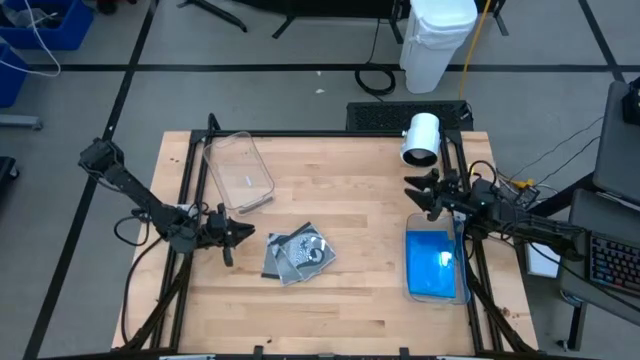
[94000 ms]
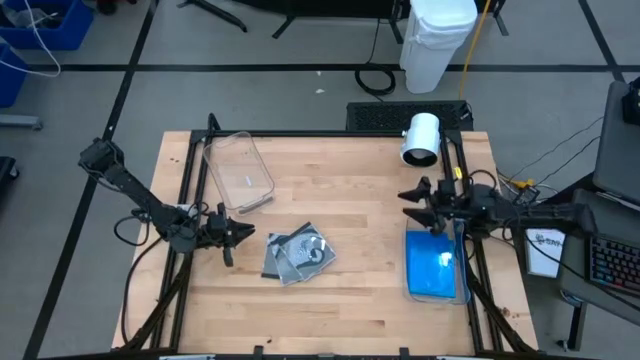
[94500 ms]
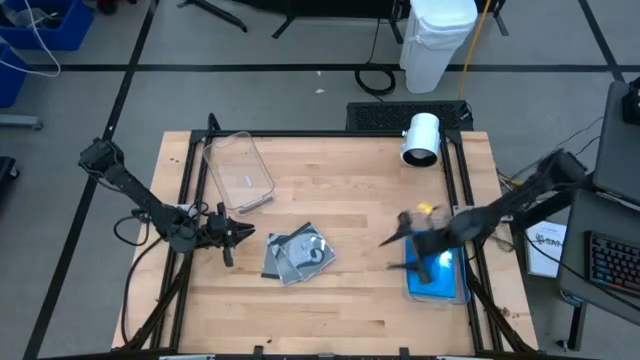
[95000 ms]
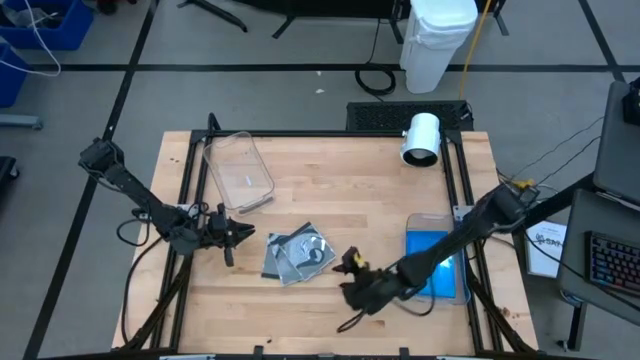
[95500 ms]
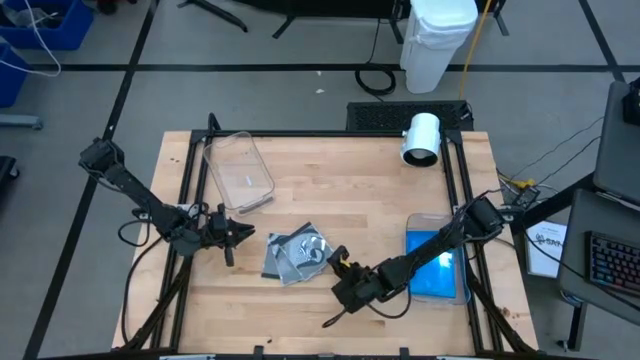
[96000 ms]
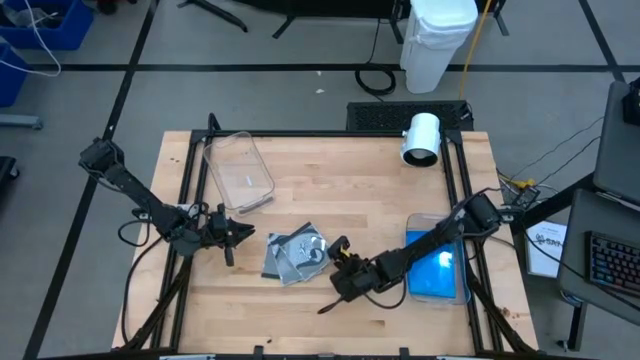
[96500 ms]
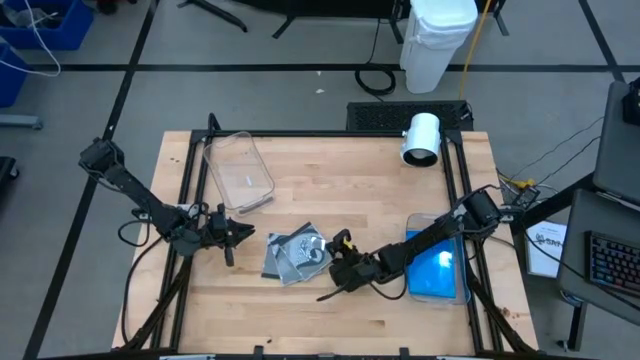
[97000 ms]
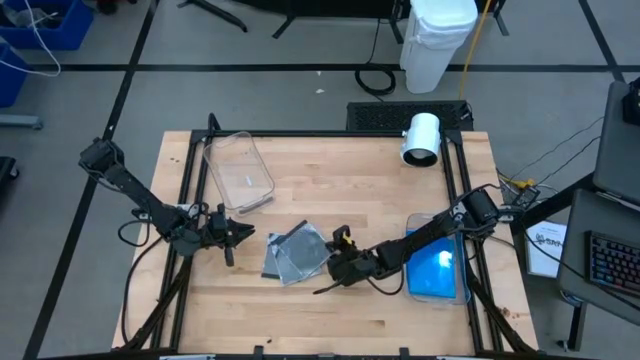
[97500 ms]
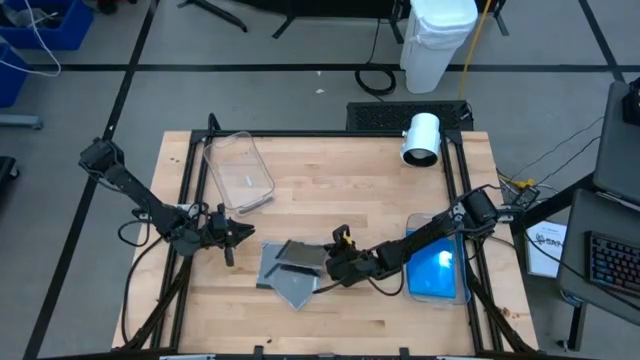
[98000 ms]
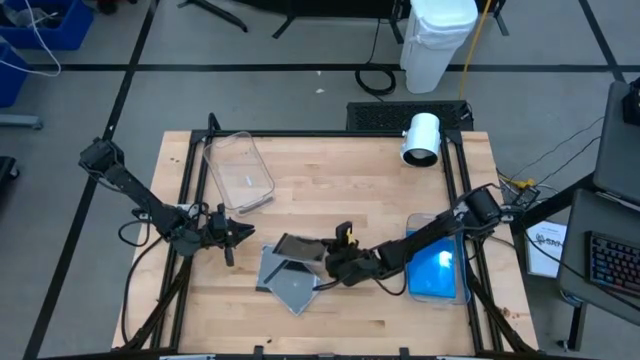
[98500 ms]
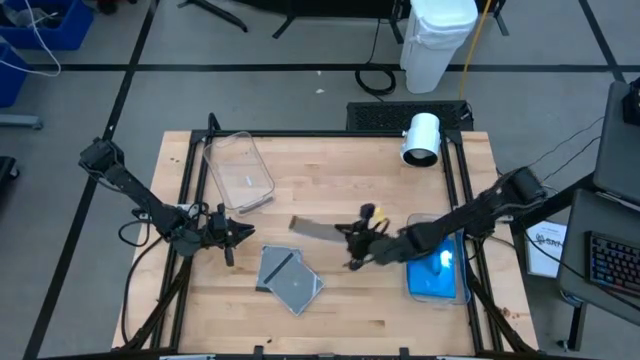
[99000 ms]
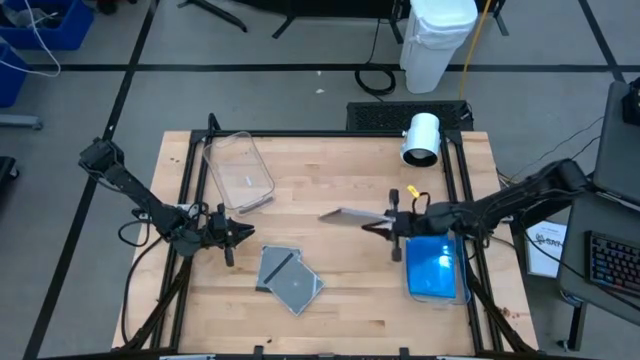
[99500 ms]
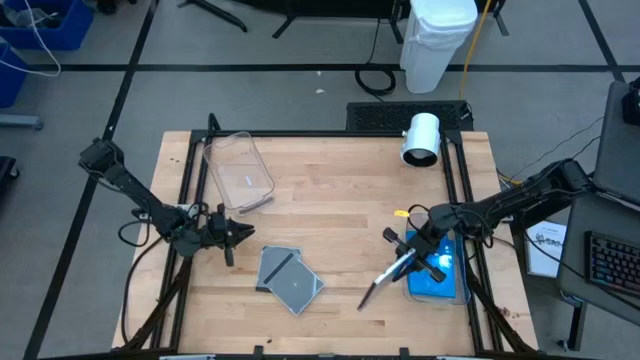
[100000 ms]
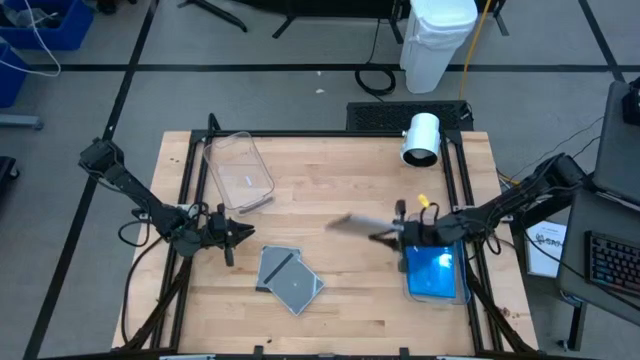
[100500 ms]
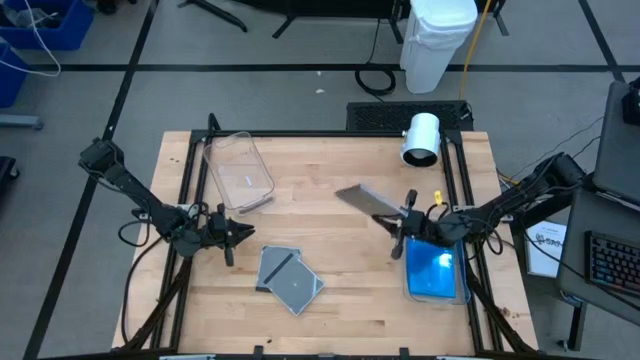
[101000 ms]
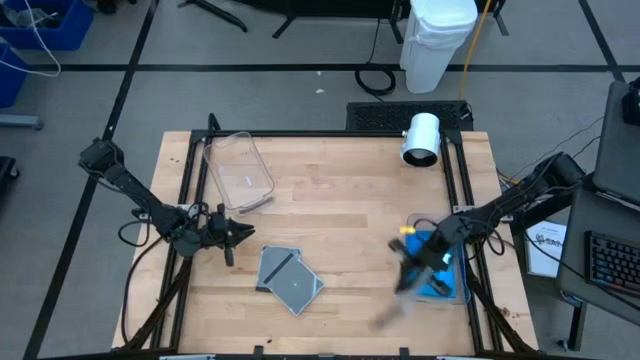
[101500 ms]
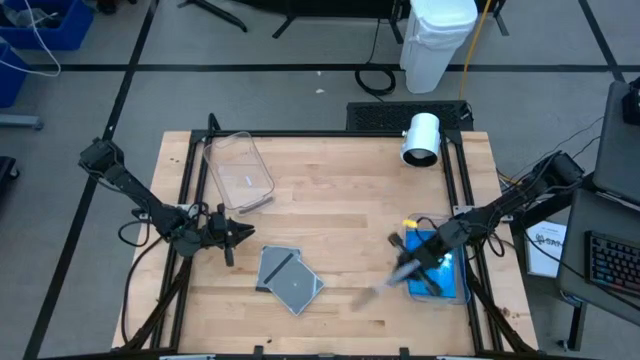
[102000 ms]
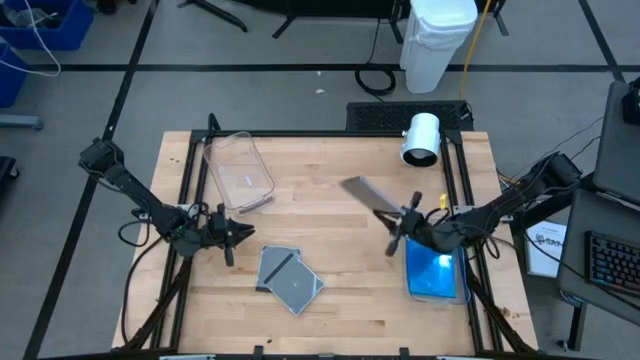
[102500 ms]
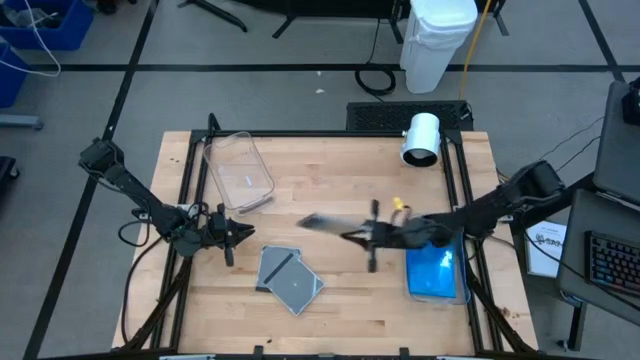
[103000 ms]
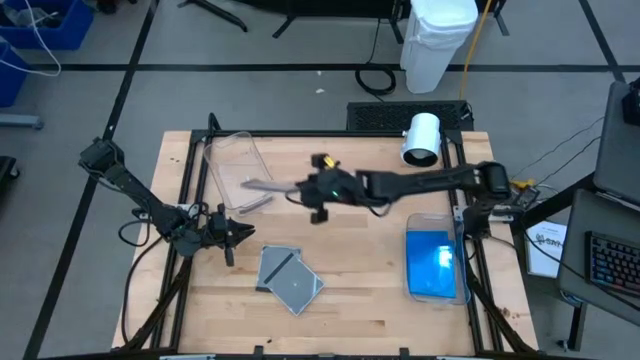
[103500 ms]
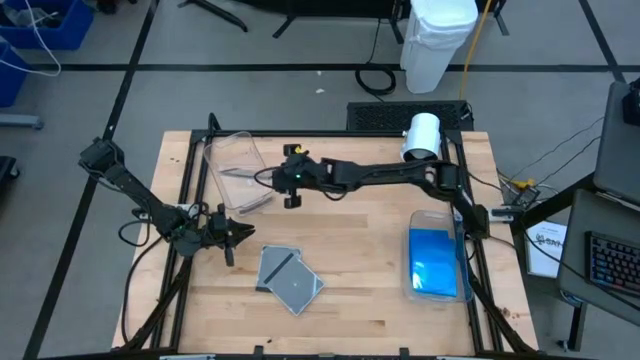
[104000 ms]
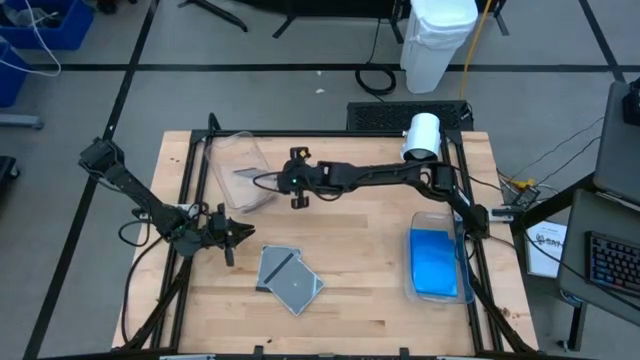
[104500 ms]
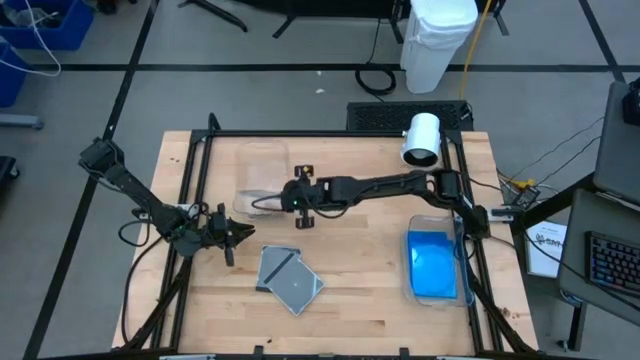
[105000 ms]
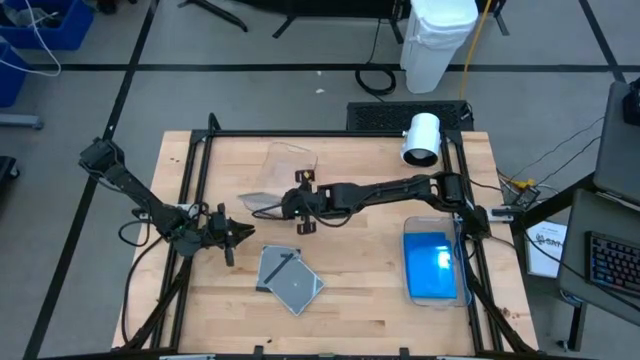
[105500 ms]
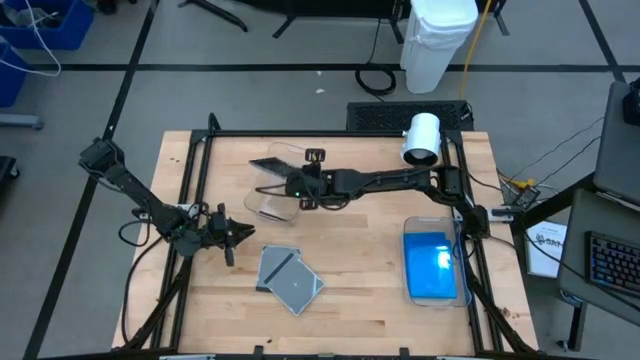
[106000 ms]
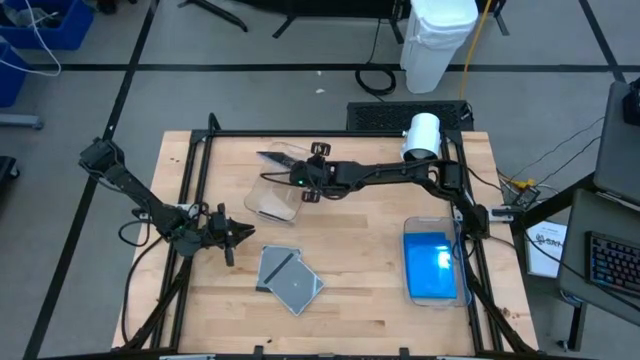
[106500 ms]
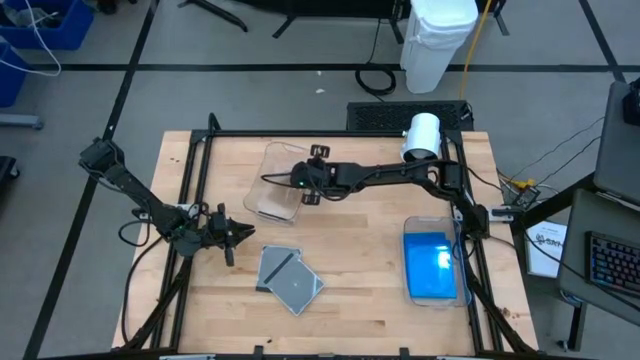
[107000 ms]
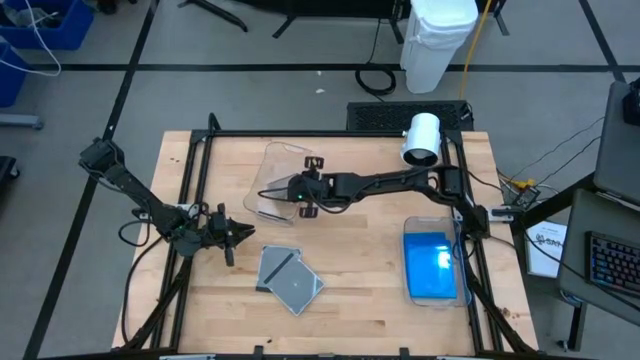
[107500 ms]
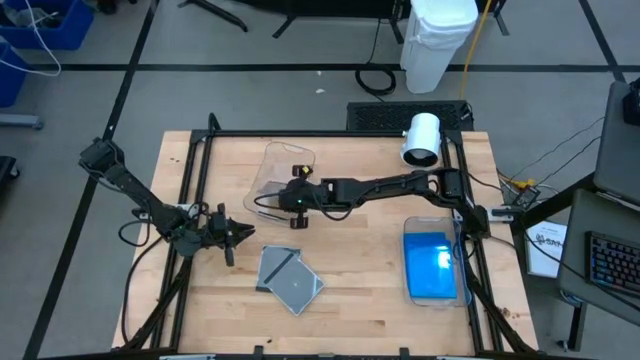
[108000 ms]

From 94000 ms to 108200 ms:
Task: Pick & place jewel cases by type
Put the top black disc case into the left transparent bin

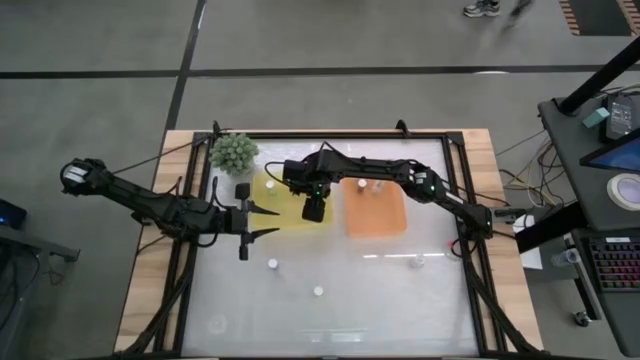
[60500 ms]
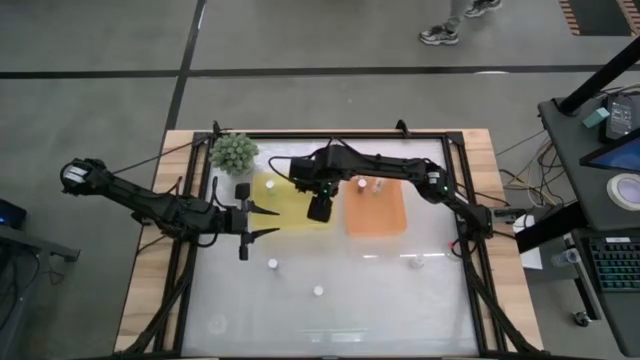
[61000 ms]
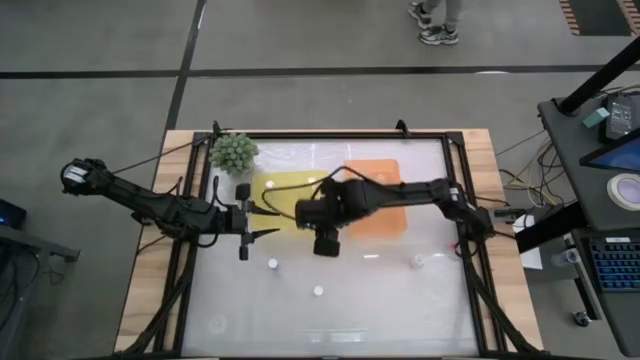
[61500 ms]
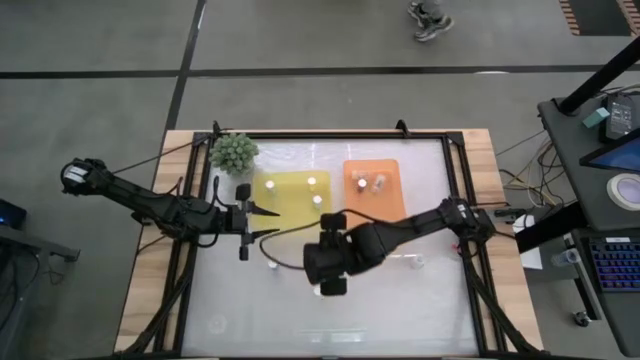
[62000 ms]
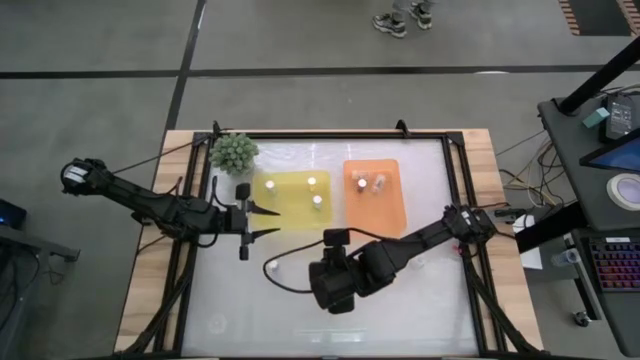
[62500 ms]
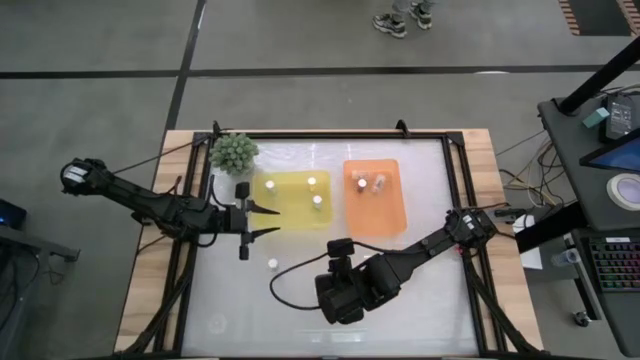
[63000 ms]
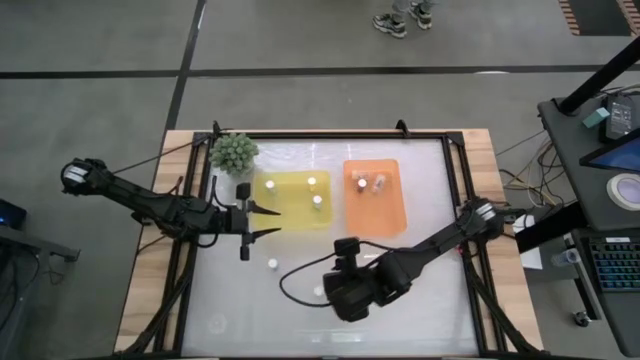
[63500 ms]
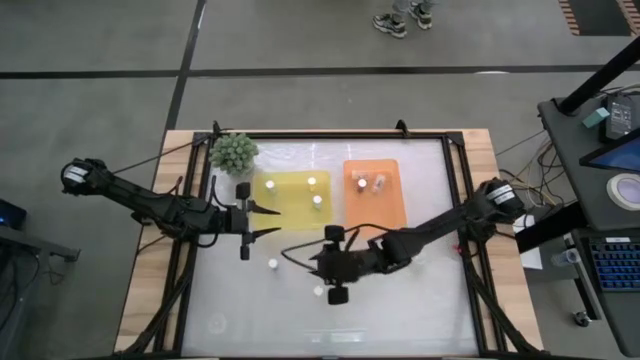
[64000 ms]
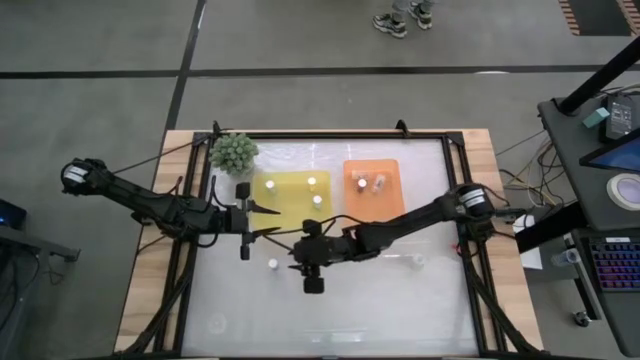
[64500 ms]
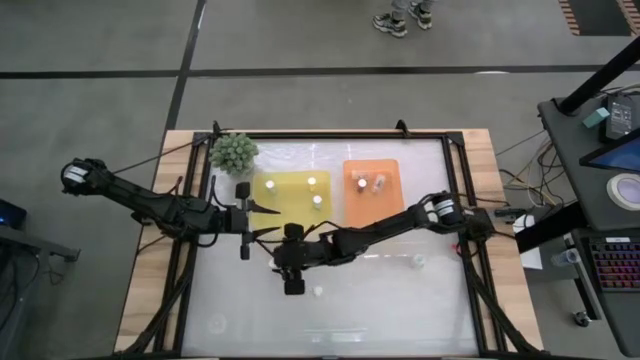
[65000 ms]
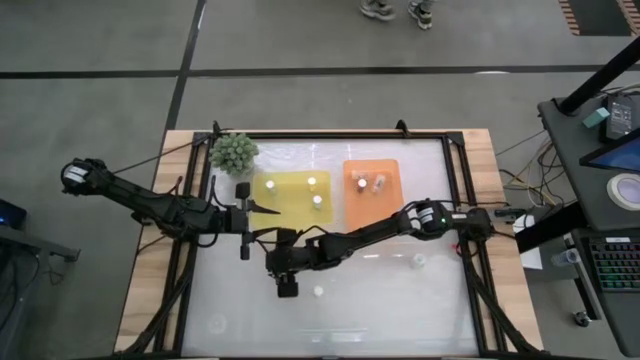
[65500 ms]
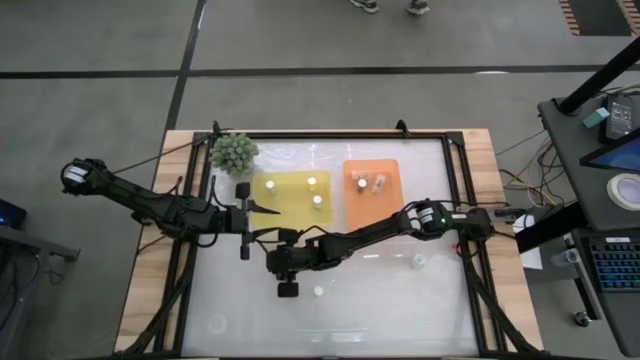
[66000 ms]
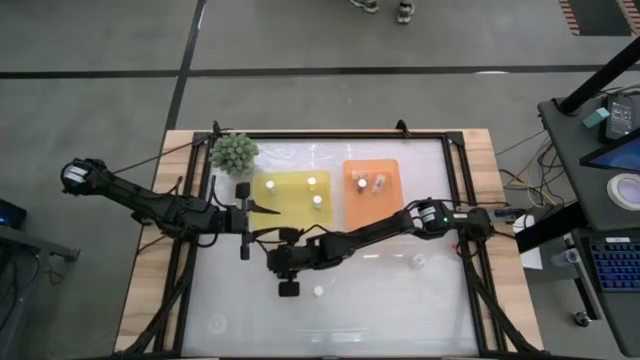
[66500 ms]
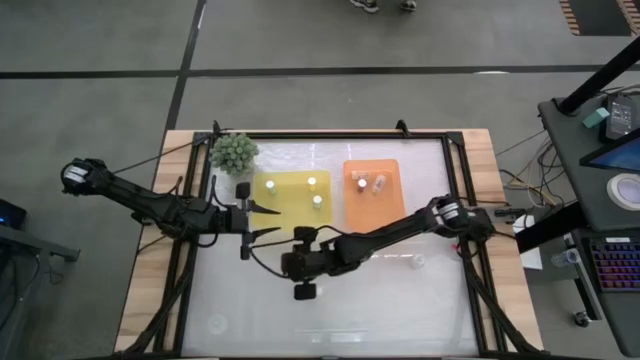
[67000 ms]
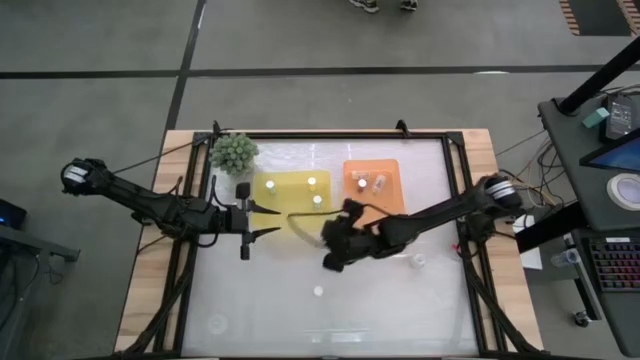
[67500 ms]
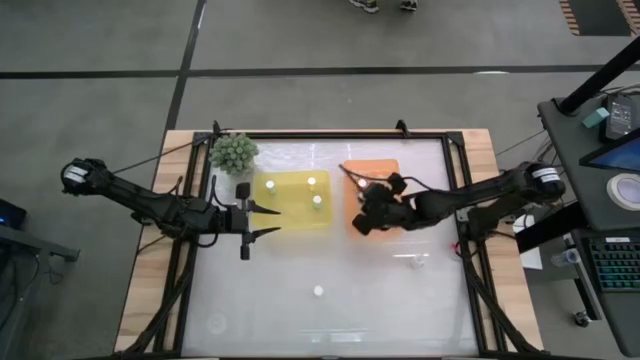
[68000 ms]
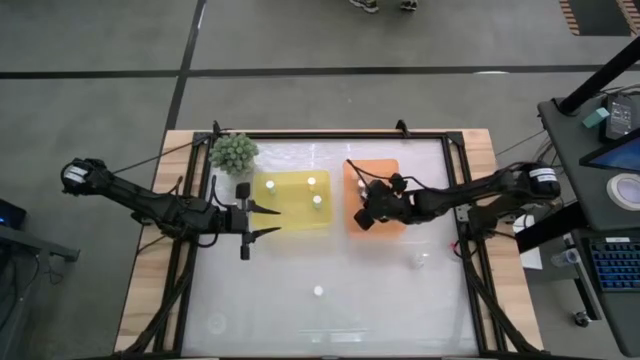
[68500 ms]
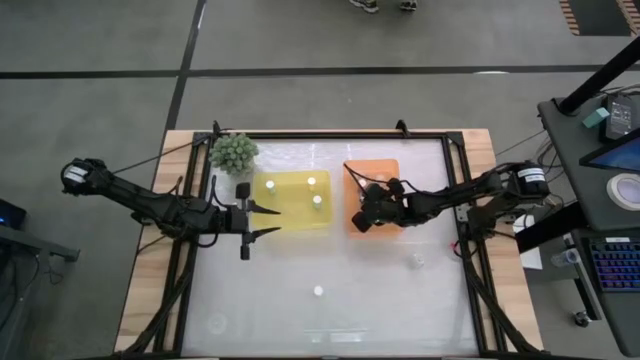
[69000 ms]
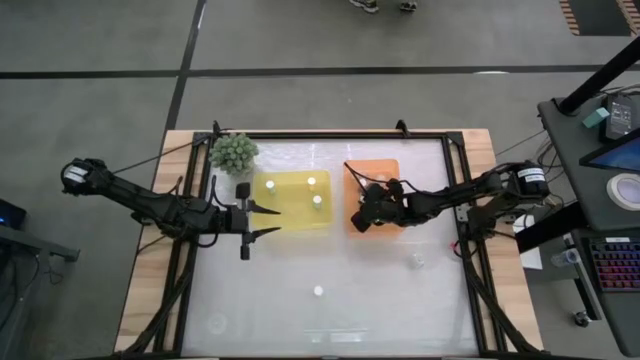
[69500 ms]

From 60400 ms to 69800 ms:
Task: Pick and place medicine bottles into bin by pill shape (circle, oval)
Put the blue pill bottle into the orange bin
